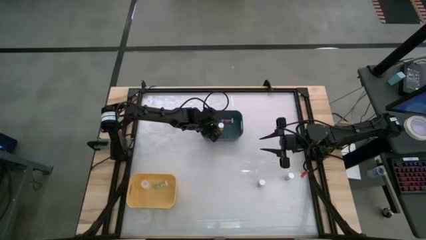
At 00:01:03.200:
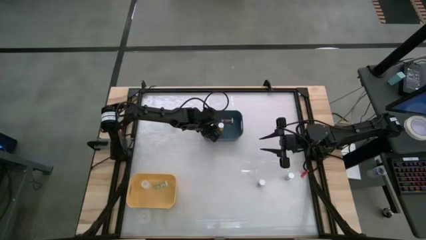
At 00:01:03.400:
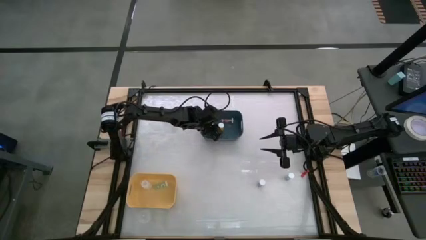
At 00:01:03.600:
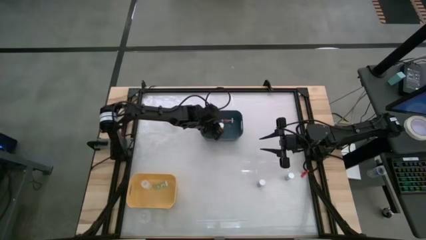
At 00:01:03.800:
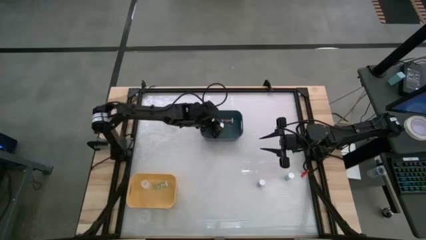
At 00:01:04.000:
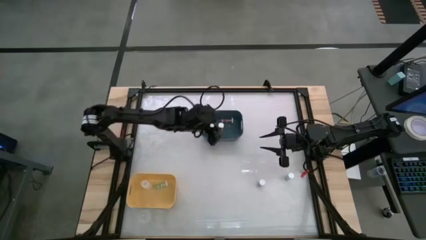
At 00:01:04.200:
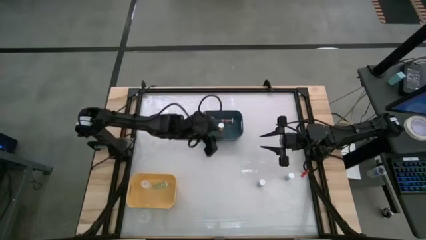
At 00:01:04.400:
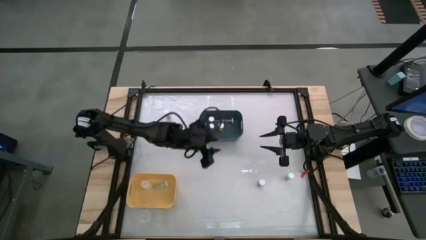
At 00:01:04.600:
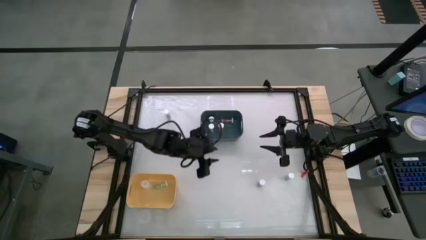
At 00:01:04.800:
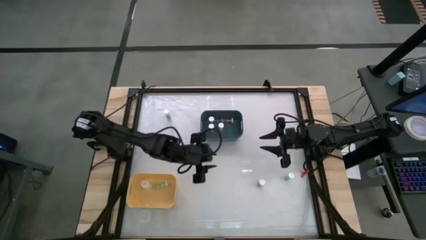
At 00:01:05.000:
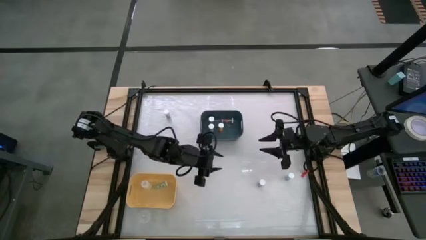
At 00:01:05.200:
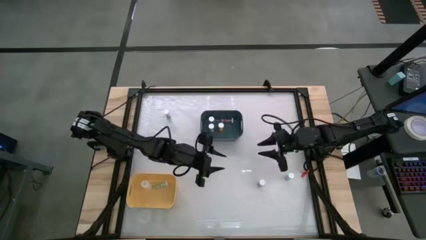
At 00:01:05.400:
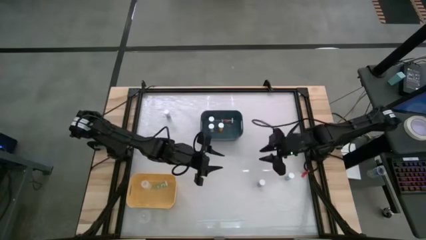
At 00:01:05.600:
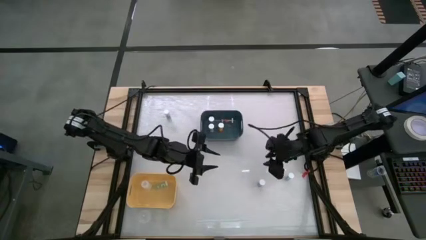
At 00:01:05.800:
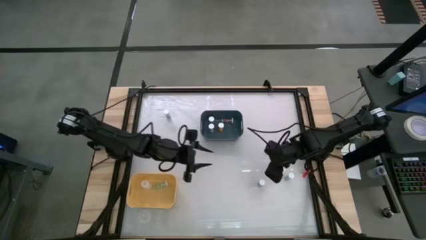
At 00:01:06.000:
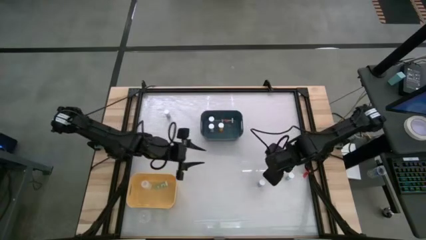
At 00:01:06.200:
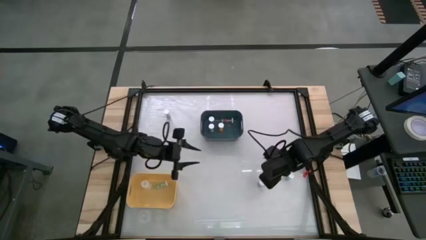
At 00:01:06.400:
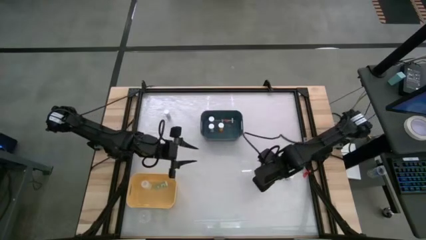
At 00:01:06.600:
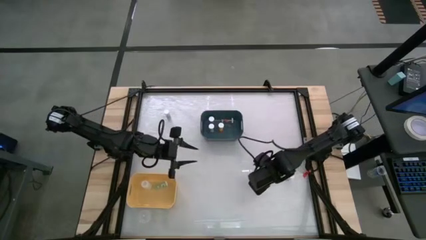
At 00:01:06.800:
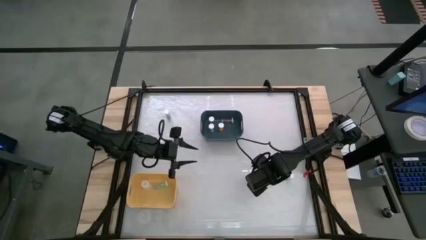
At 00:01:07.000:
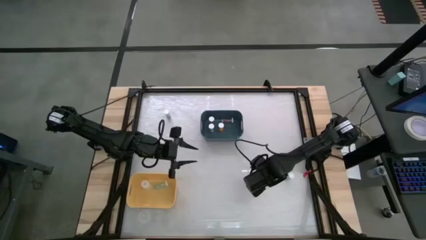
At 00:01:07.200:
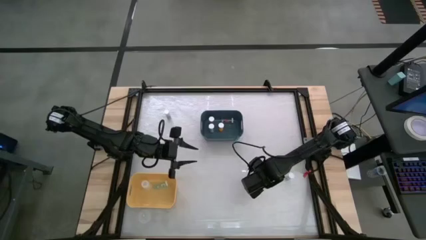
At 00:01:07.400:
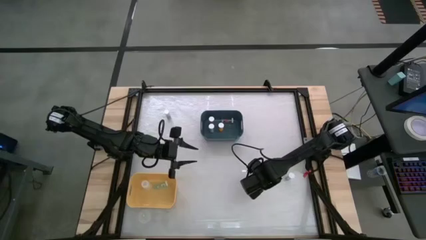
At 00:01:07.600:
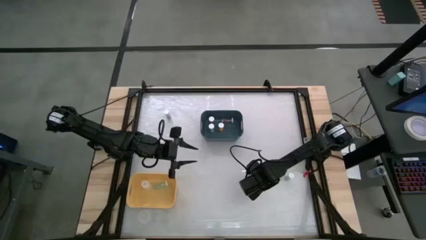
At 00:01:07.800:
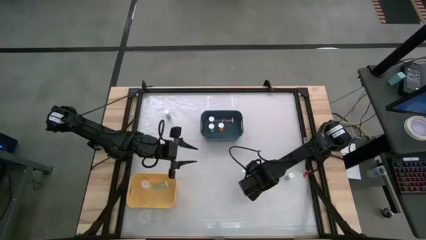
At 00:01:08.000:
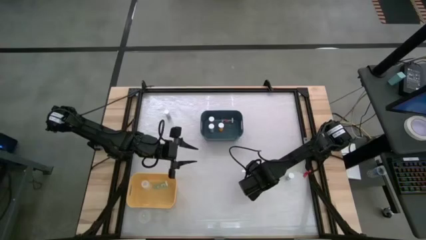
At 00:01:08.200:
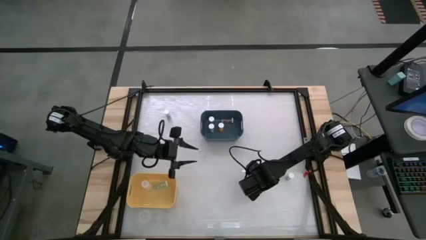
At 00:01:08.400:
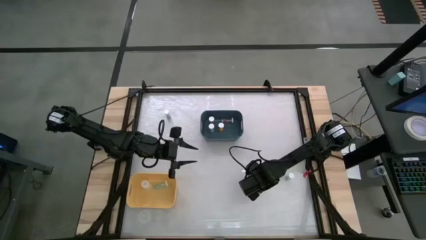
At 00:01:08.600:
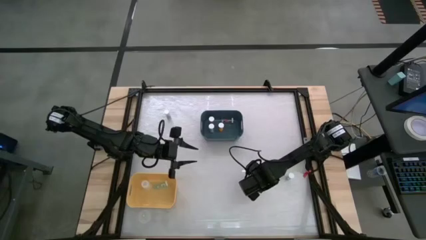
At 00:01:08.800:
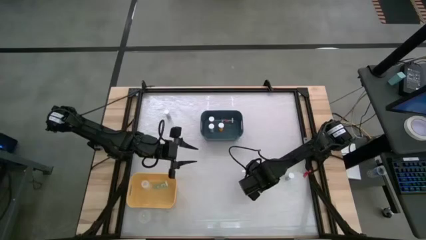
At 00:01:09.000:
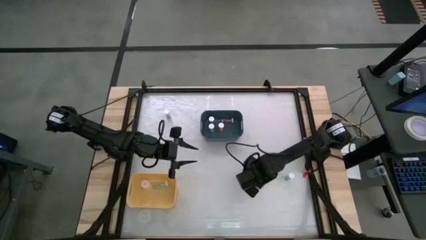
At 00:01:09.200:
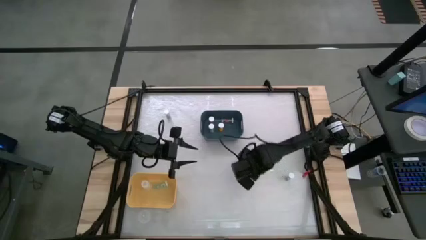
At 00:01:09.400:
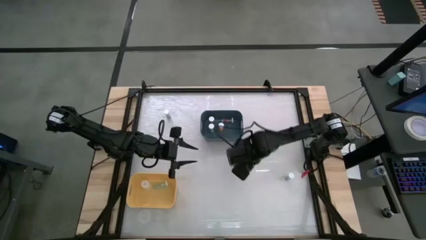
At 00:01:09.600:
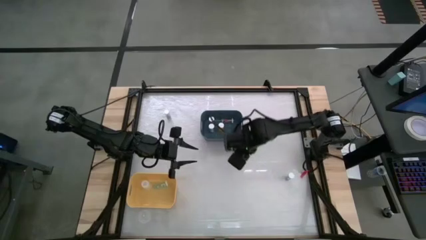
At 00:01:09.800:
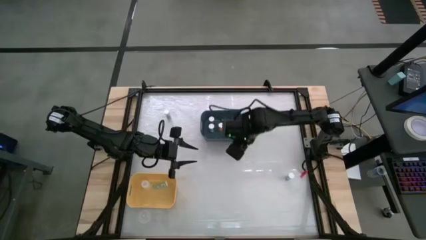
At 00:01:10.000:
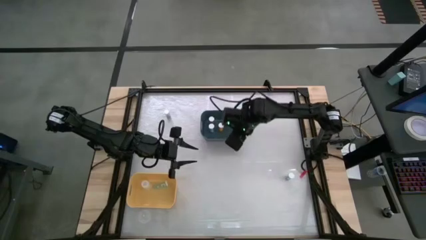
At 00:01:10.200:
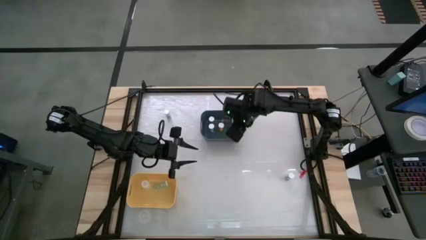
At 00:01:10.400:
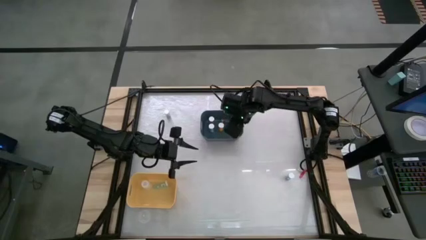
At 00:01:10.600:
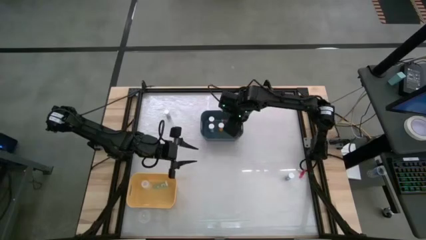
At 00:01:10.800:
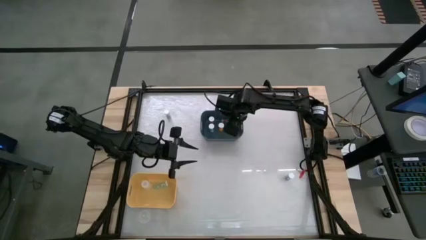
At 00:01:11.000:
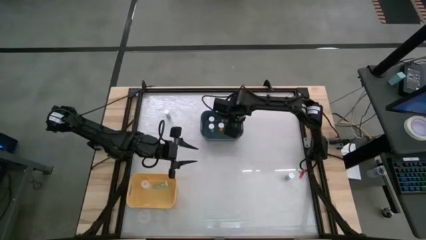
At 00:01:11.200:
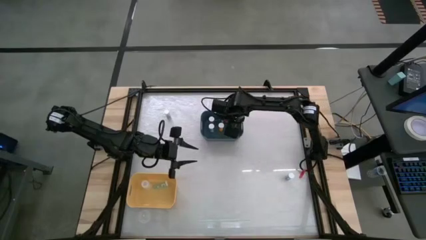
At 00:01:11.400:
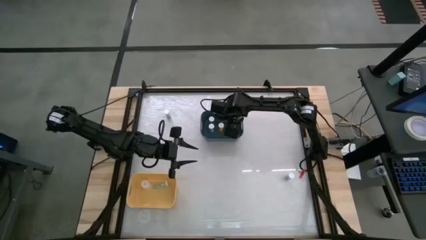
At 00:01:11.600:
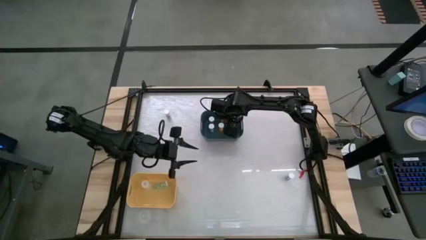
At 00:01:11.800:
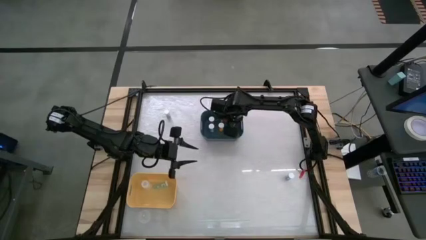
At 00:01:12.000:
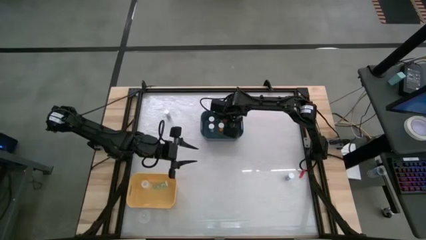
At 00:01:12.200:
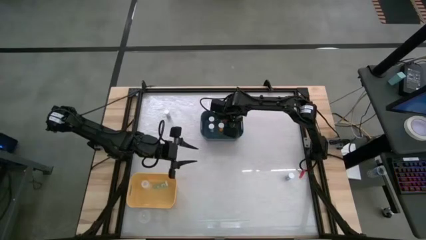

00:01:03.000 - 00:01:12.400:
Task: Pick and place medicine bottles into bin by pill shape (circle, oval)
Put the blue capsule bottle into the blue bin

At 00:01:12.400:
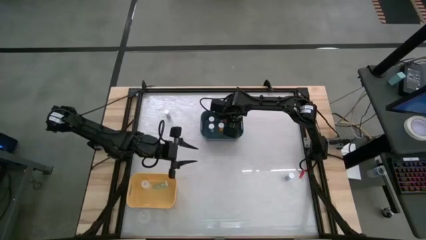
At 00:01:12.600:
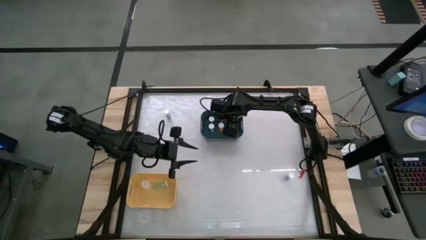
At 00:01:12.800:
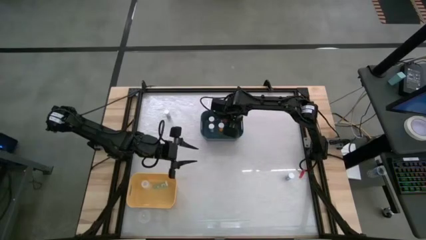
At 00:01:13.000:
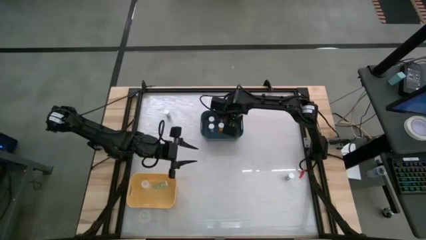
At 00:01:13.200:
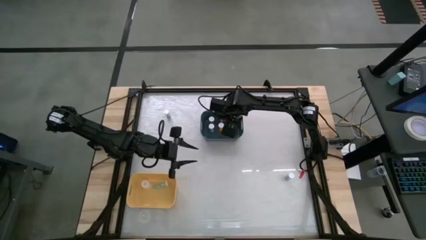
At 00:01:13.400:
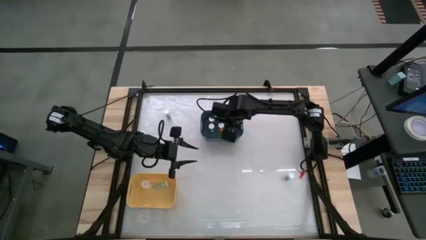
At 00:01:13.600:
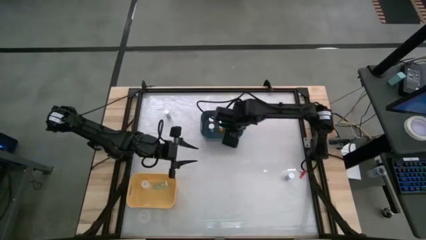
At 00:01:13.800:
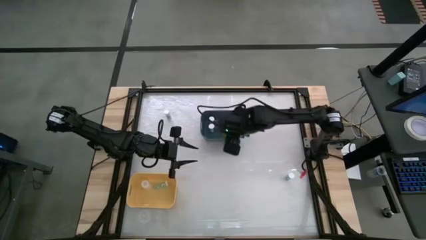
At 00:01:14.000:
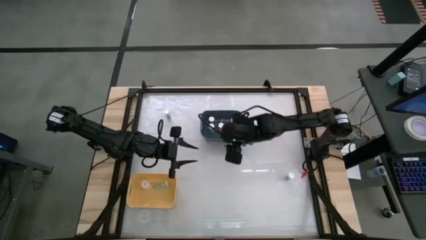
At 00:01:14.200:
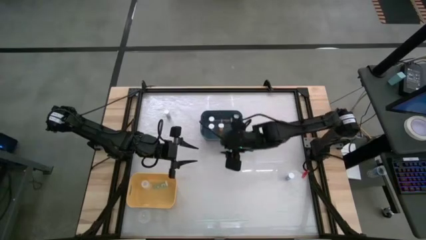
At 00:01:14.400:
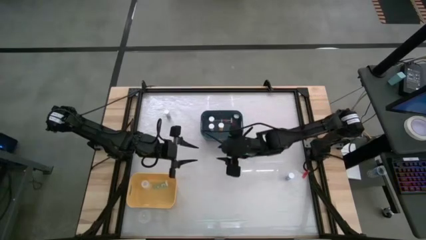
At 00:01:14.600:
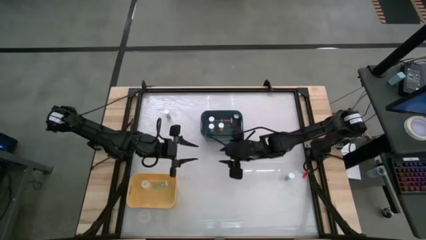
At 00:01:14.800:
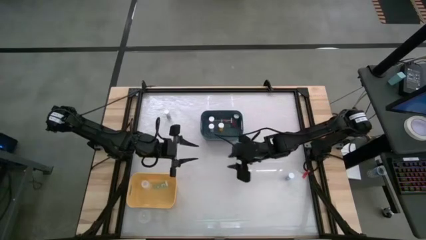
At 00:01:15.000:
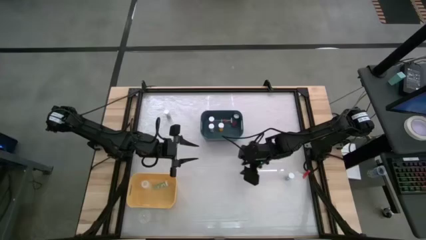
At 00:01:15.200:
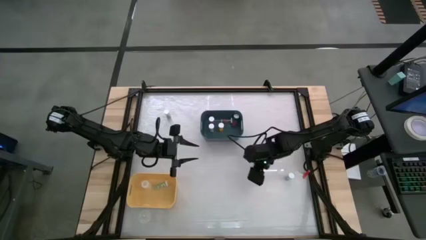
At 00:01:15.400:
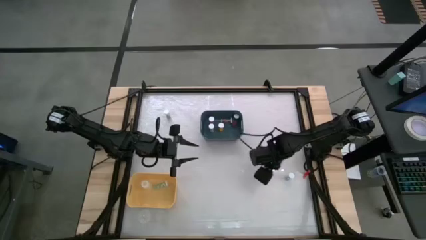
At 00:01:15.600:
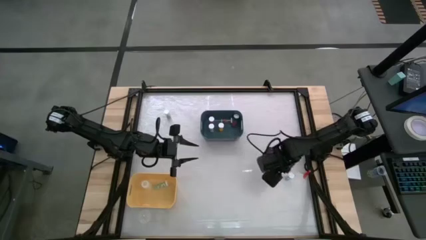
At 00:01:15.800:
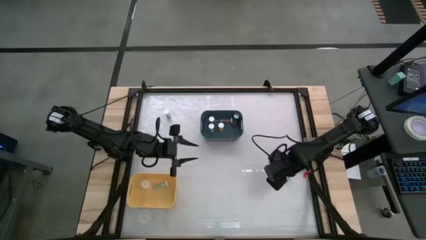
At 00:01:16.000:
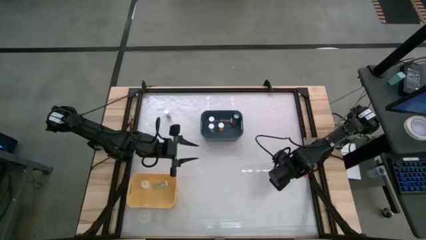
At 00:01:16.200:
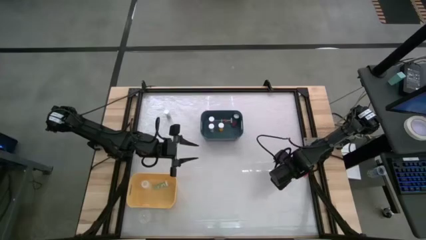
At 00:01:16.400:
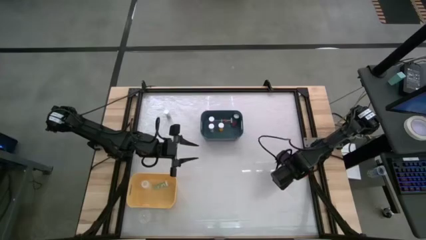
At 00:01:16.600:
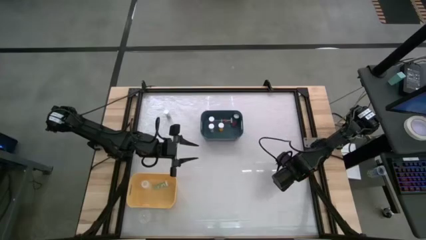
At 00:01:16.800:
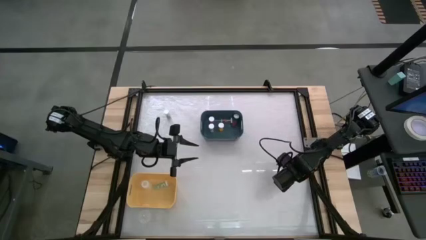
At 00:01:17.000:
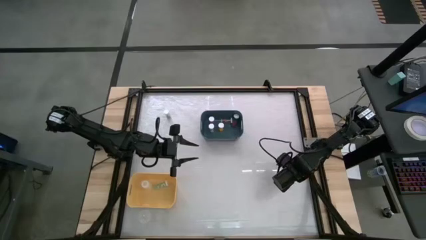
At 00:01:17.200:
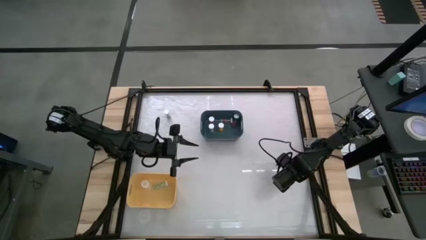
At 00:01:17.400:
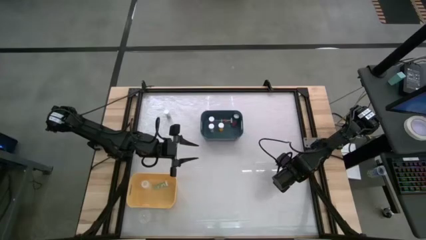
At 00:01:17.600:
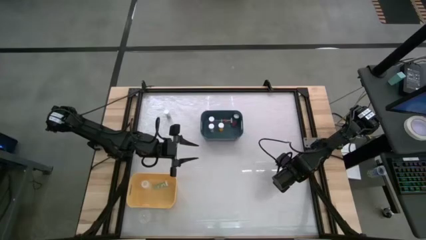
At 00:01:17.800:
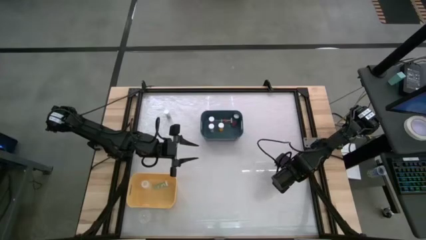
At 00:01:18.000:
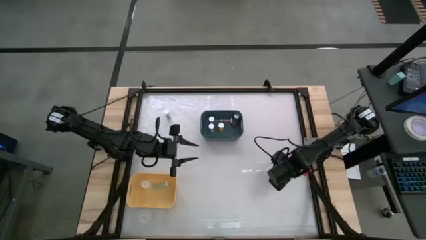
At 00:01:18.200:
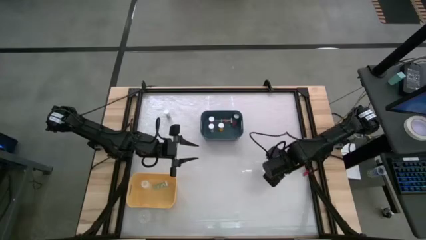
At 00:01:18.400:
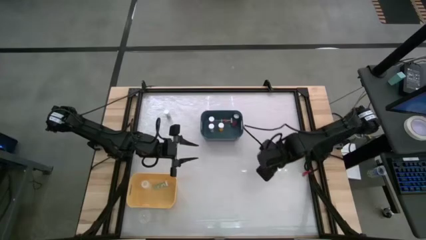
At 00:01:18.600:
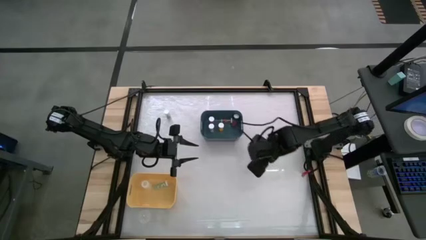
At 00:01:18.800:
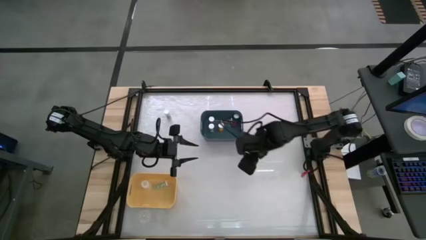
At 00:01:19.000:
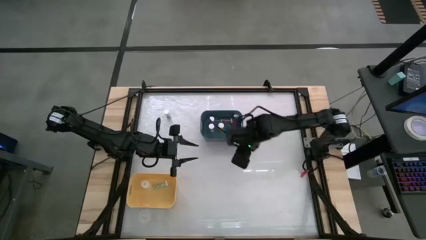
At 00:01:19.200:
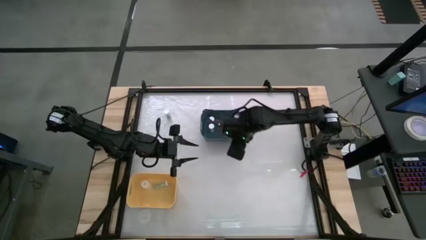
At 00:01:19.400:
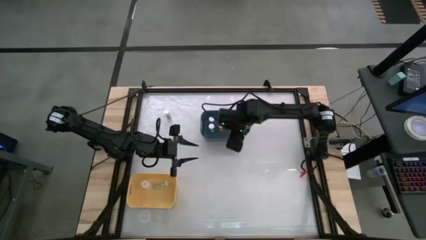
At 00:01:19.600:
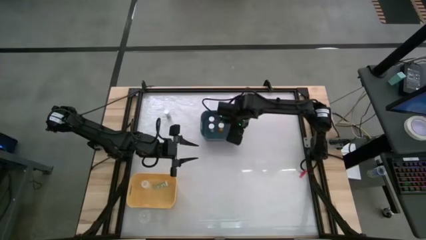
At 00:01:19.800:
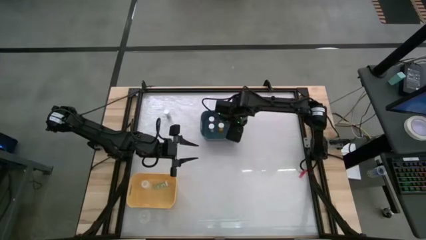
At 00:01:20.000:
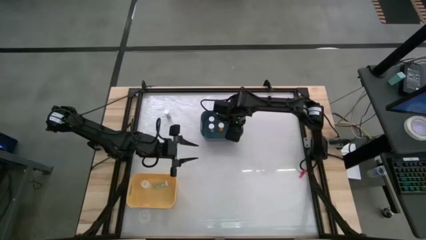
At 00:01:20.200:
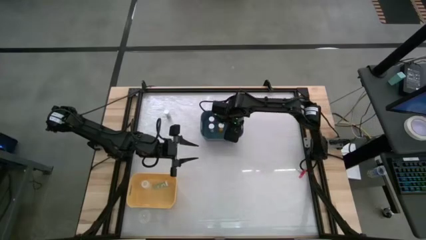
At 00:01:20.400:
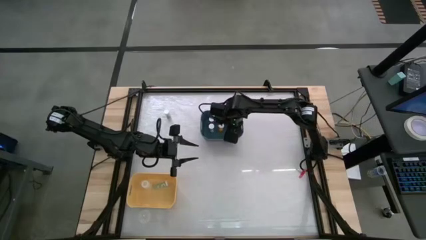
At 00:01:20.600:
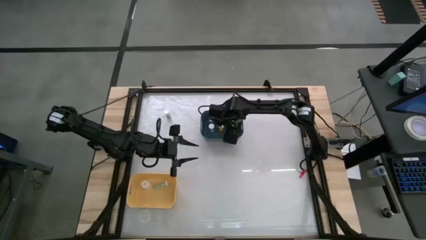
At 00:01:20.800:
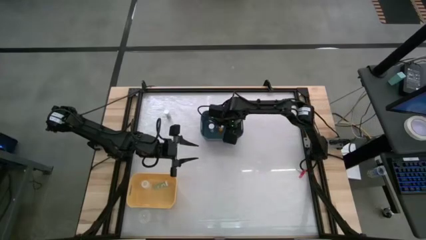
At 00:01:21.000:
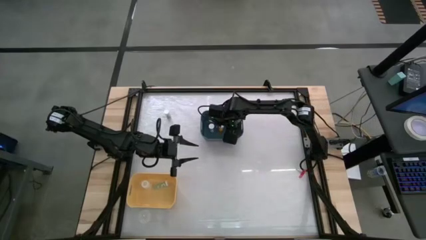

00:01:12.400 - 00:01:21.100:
Put the blue capsule bottle into the blue bin
